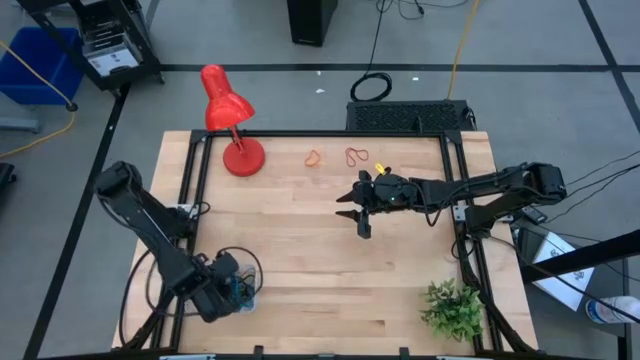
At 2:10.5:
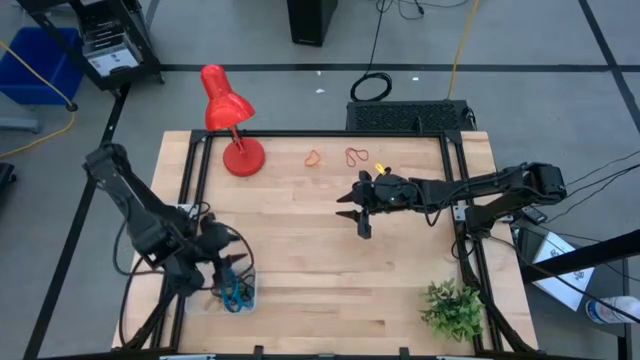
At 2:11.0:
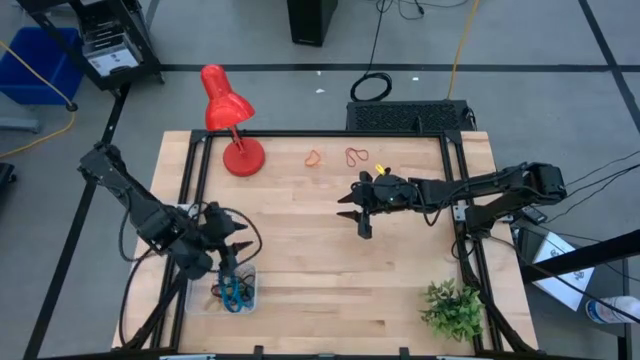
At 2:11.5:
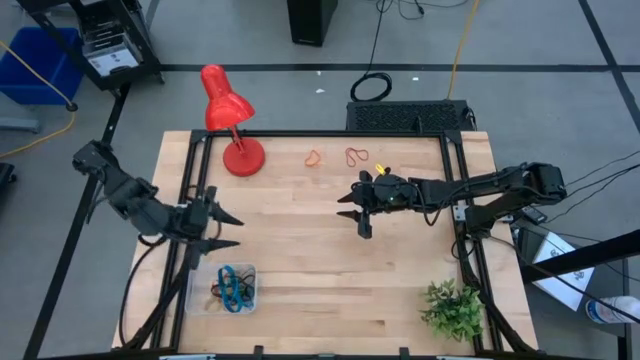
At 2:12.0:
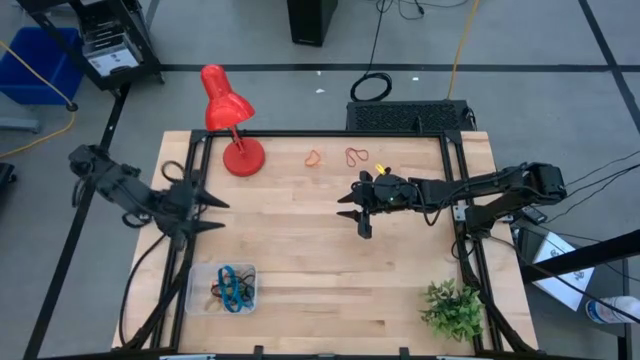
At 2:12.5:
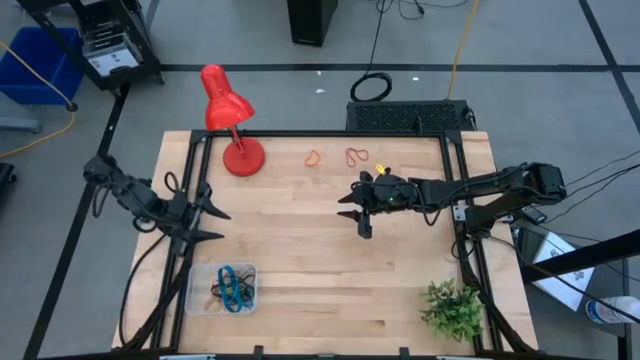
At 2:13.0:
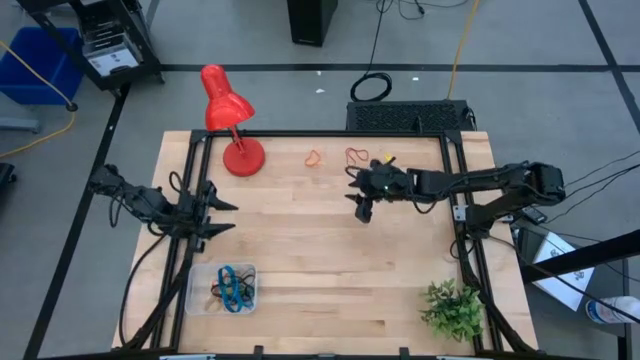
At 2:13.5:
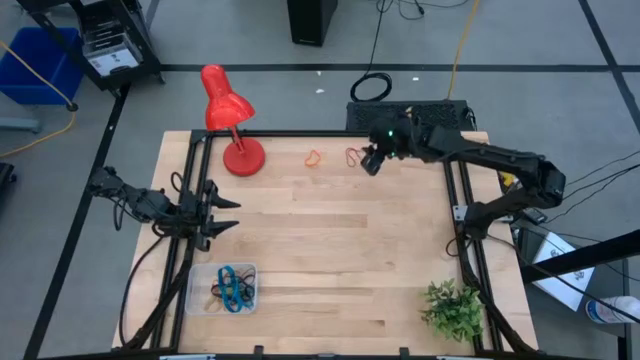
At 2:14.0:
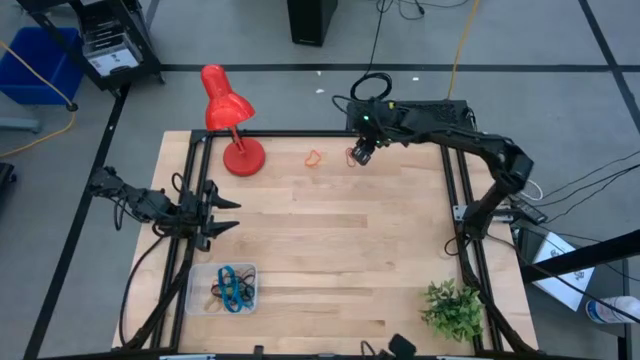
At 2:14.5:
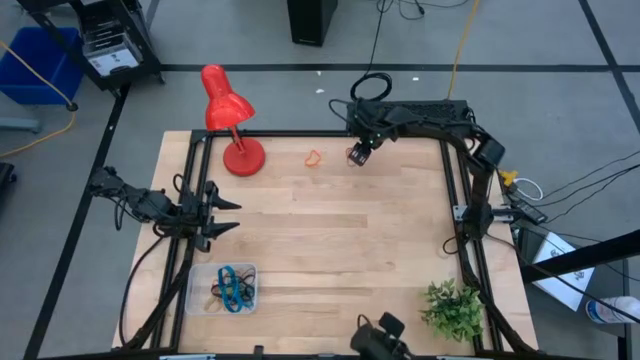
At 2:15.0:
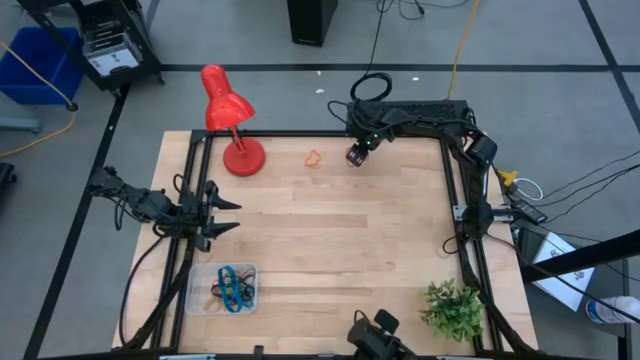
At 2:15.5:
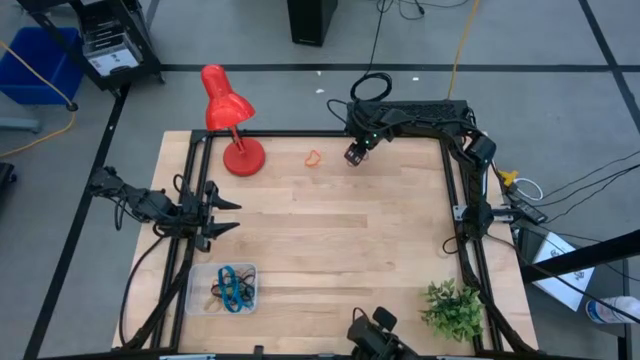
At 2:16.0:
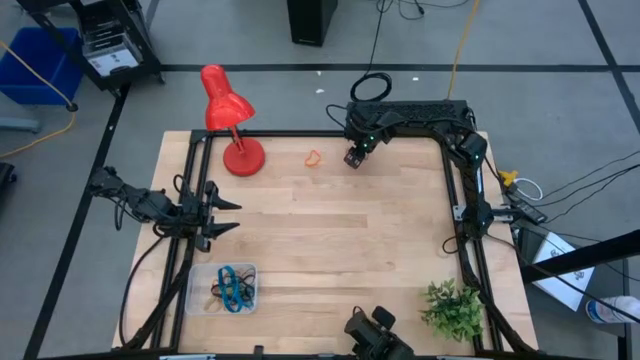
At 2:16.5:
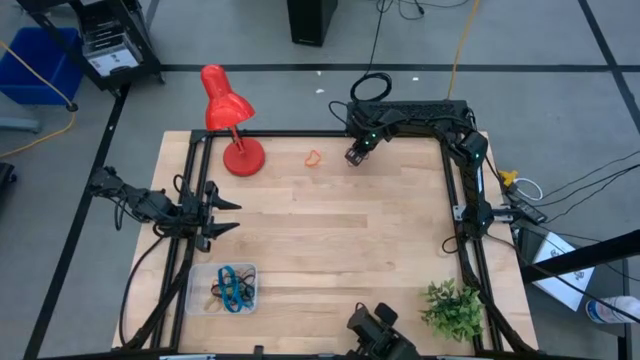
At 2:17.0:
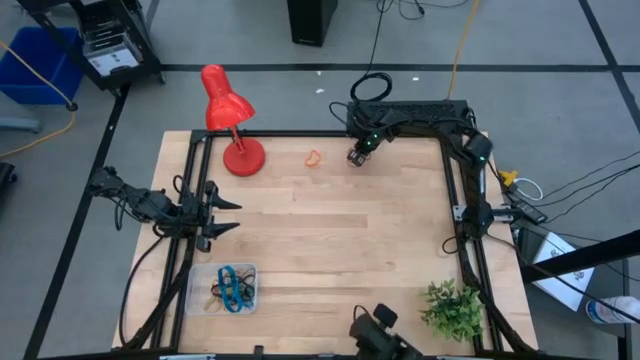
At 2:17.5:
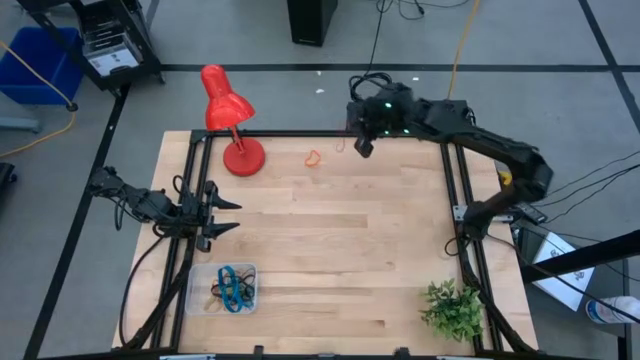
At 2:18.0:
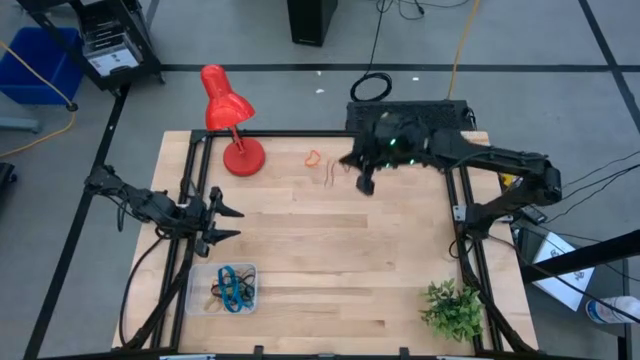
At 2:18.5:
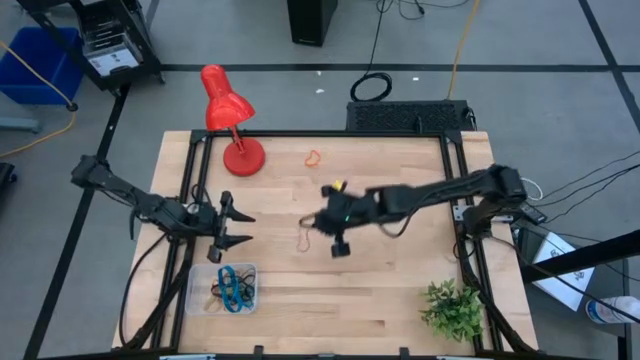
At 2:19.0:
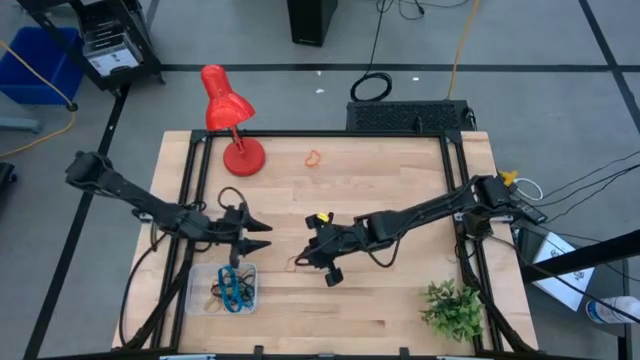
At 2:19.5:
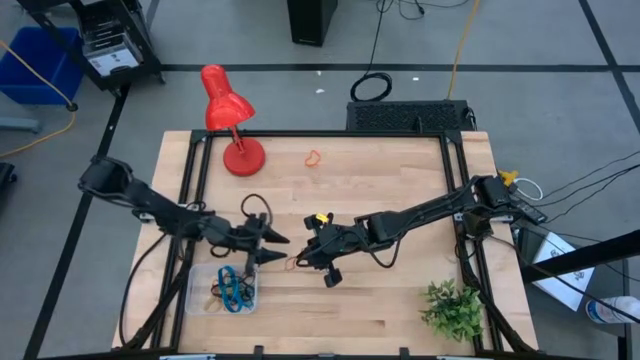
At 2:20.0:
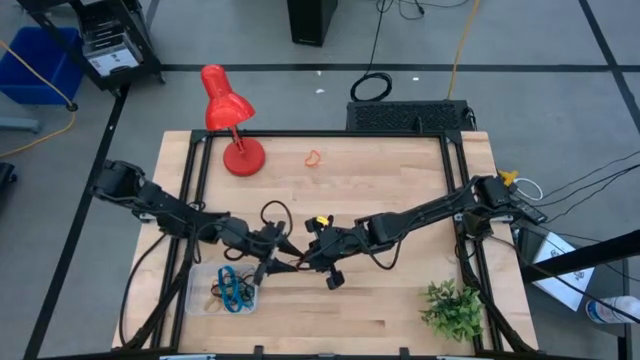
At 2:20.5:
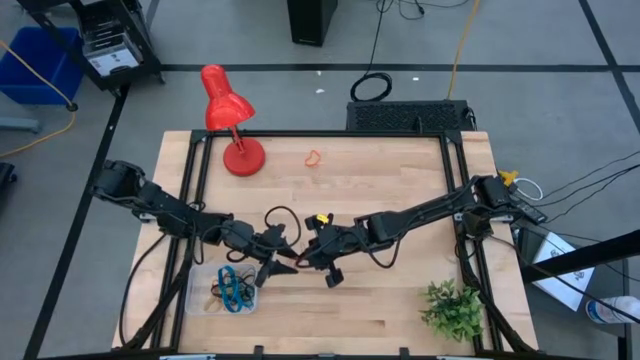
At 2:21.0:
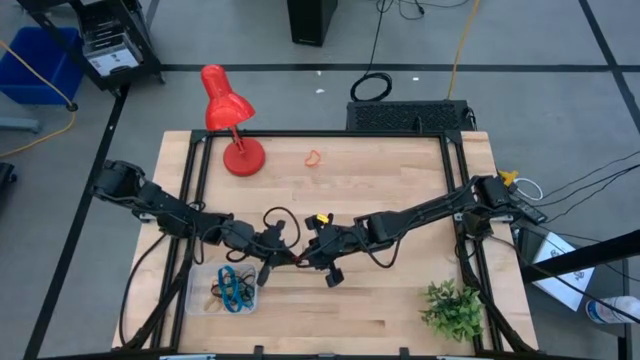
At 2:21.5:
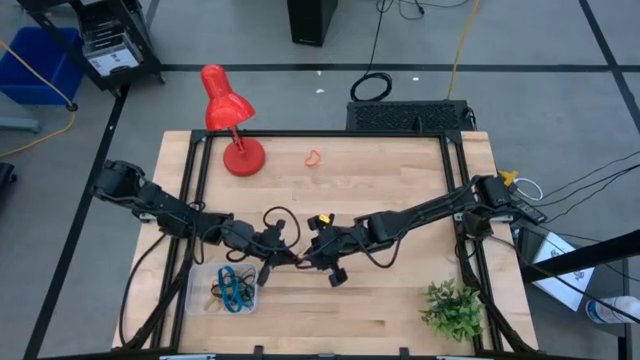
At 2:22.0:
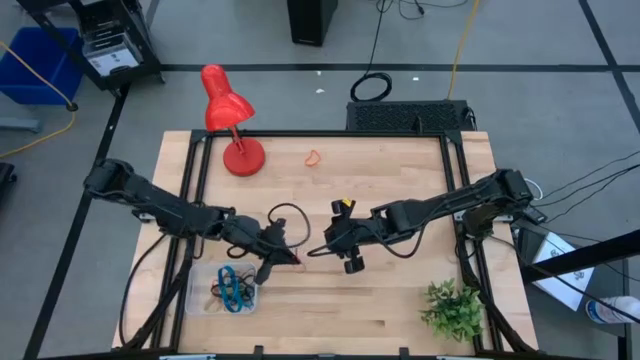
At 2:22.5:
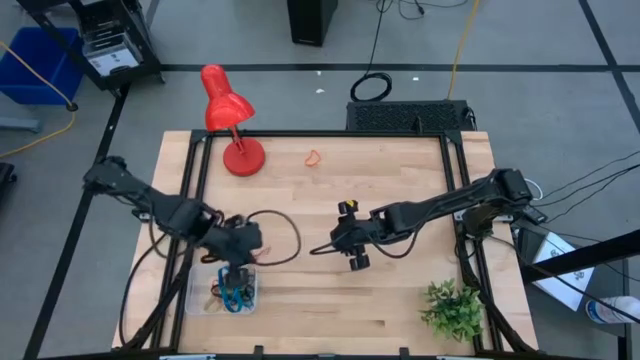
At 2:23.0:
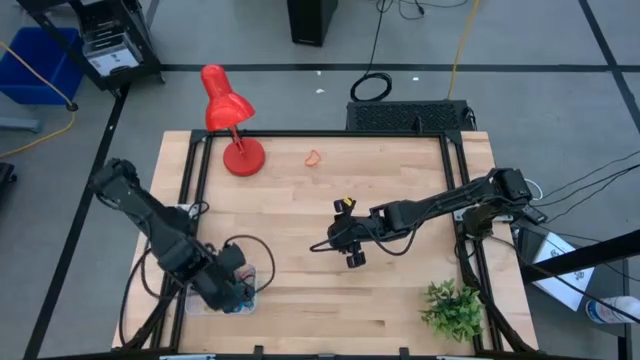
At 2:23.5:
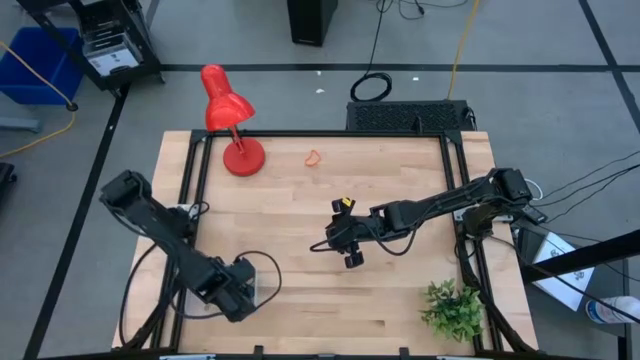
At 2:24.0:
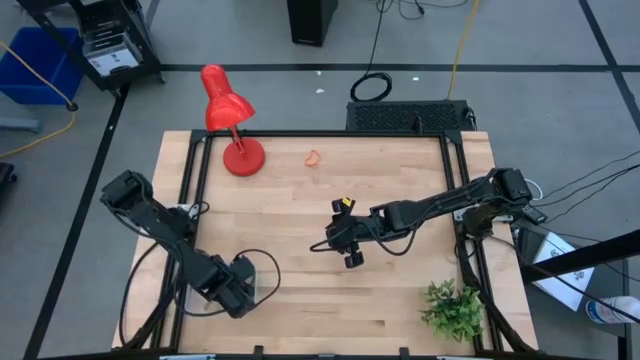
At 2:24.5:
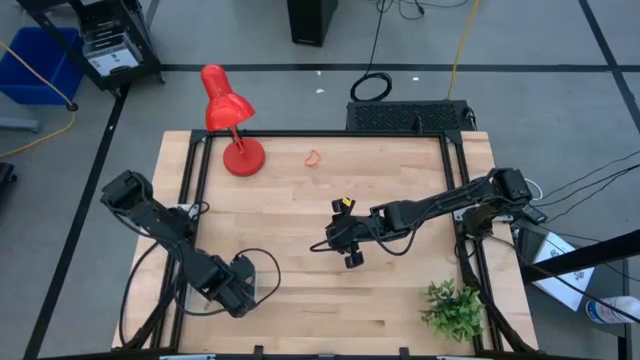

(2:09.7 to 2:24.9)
Task: Pick and place rubber bands into bin
Put the red rubber band into the transparent bin
